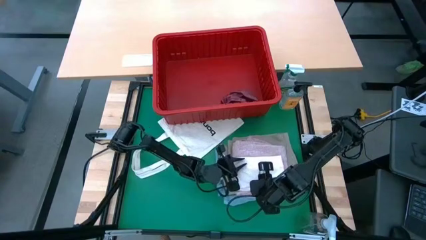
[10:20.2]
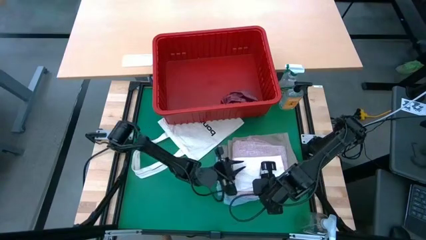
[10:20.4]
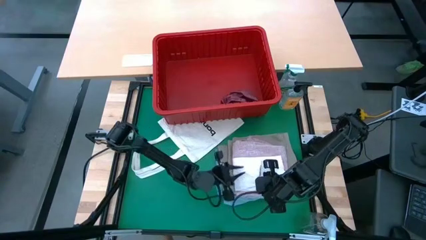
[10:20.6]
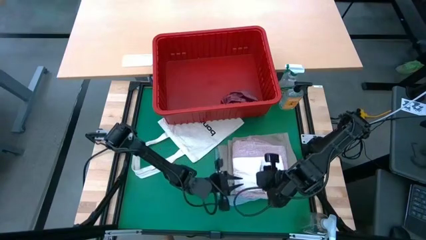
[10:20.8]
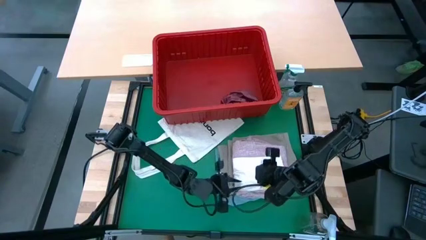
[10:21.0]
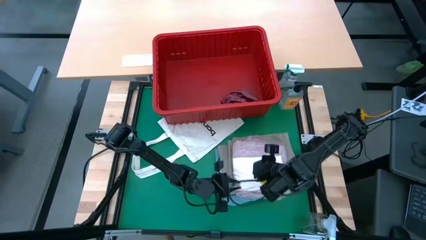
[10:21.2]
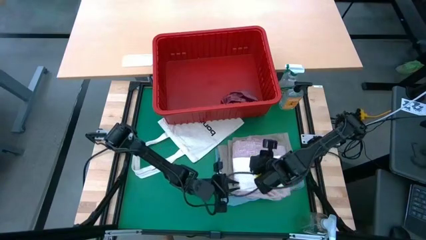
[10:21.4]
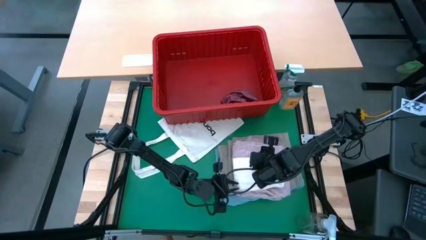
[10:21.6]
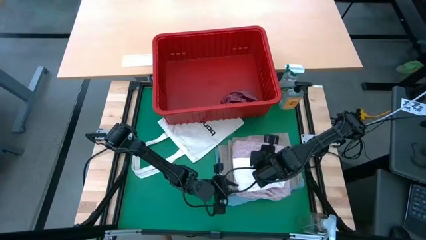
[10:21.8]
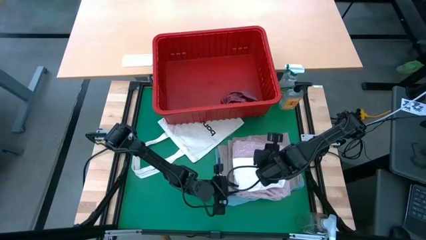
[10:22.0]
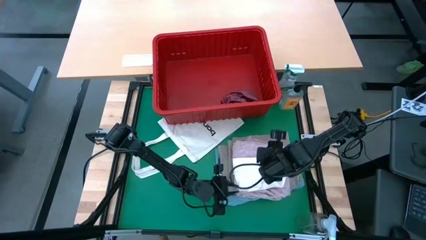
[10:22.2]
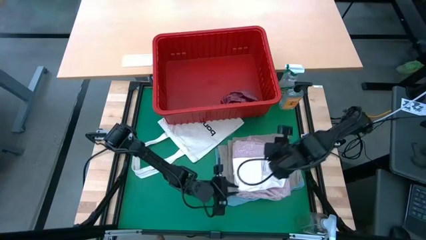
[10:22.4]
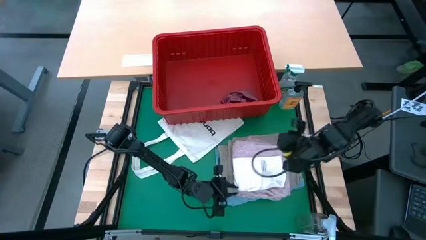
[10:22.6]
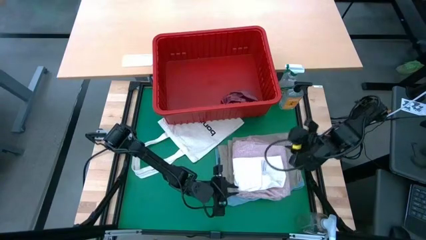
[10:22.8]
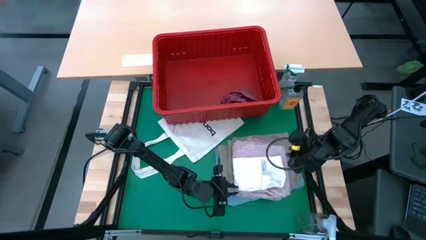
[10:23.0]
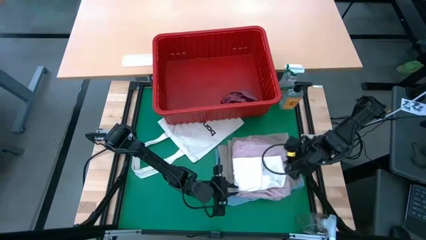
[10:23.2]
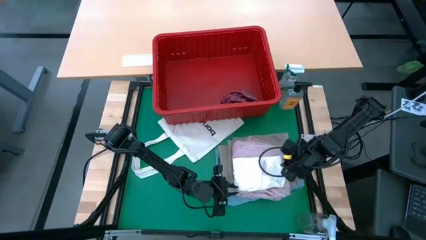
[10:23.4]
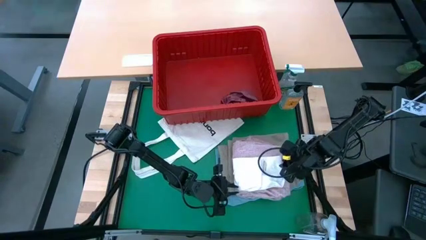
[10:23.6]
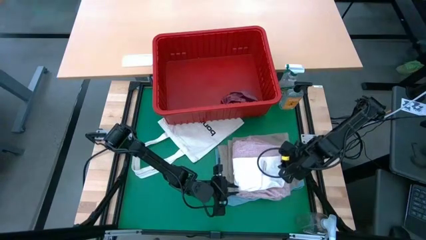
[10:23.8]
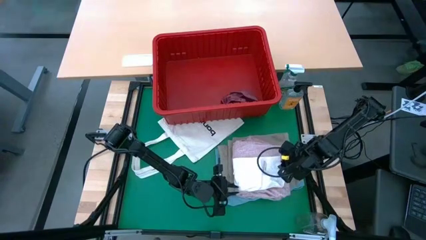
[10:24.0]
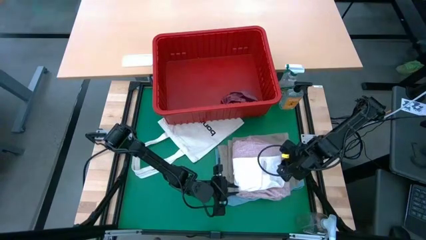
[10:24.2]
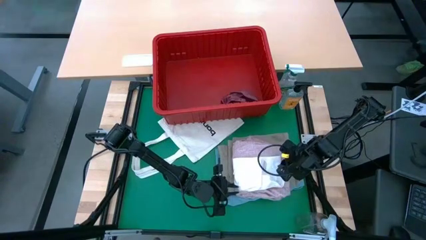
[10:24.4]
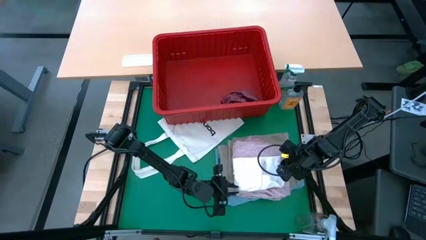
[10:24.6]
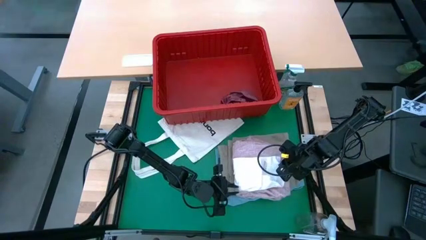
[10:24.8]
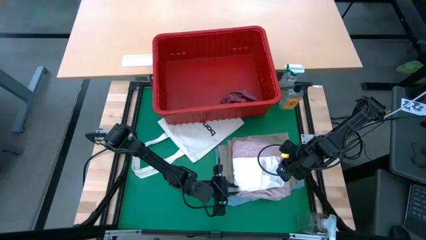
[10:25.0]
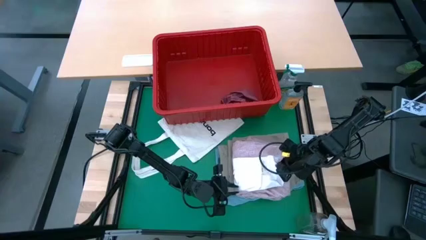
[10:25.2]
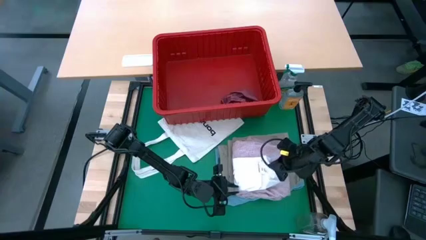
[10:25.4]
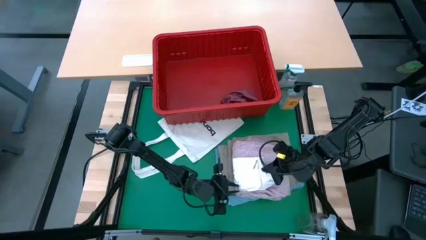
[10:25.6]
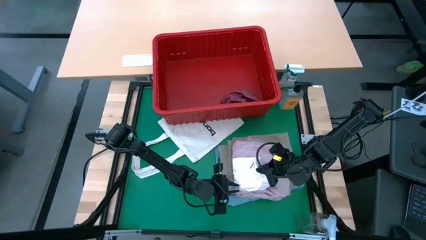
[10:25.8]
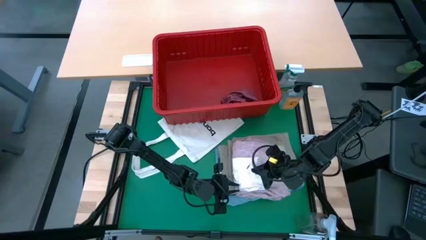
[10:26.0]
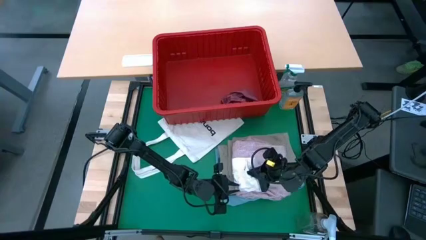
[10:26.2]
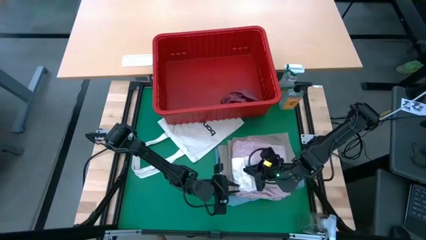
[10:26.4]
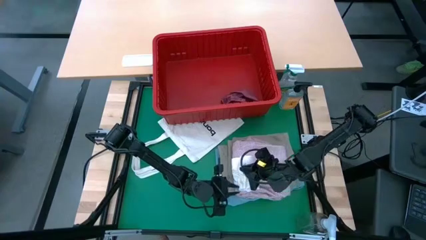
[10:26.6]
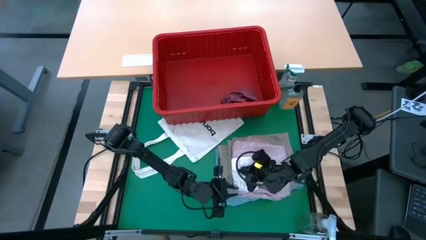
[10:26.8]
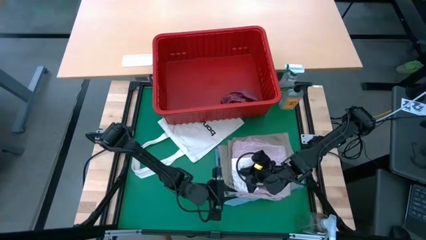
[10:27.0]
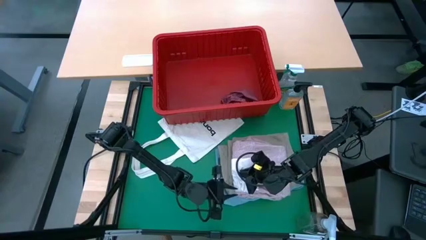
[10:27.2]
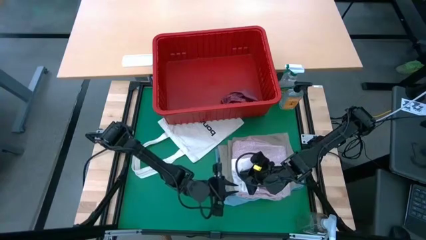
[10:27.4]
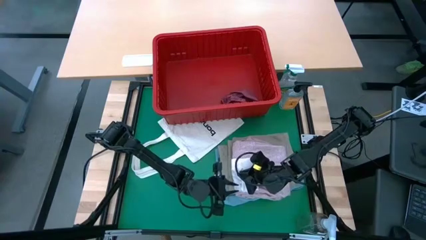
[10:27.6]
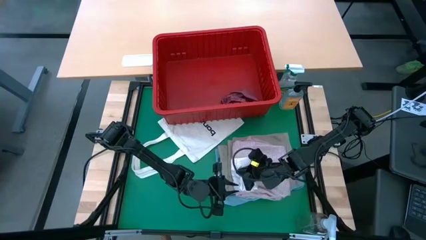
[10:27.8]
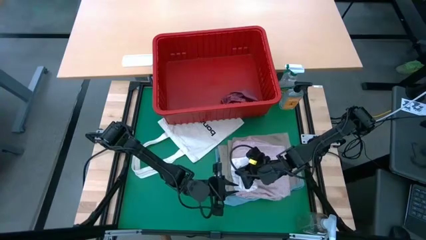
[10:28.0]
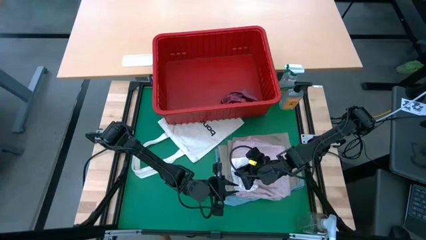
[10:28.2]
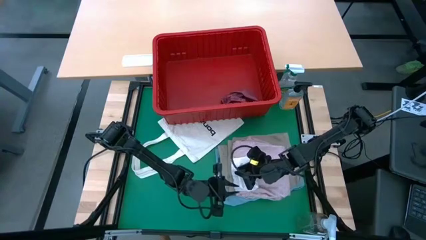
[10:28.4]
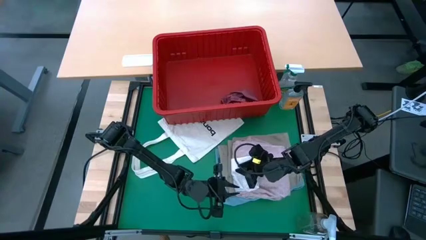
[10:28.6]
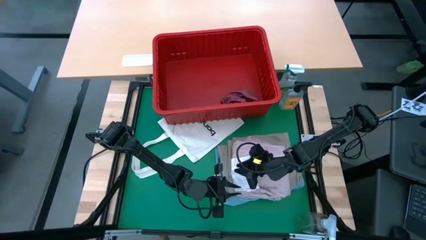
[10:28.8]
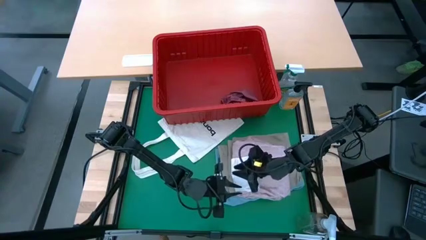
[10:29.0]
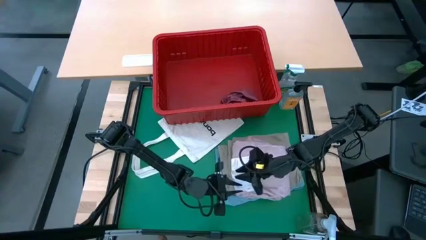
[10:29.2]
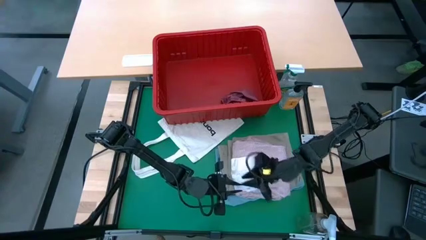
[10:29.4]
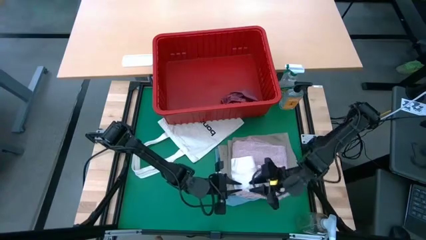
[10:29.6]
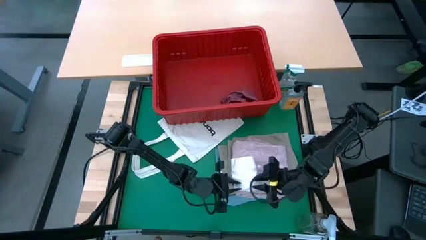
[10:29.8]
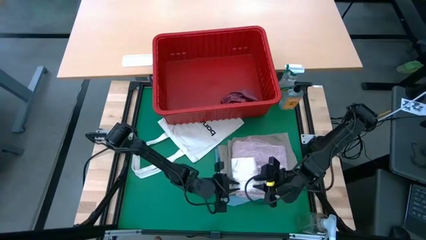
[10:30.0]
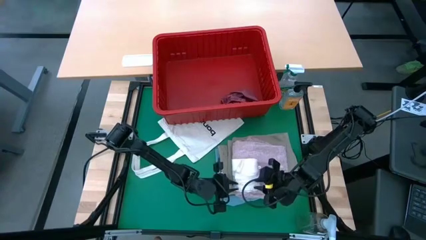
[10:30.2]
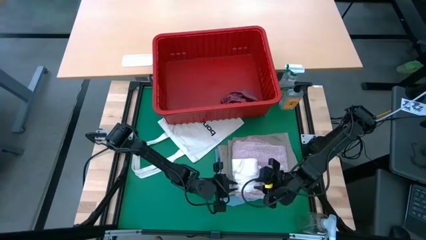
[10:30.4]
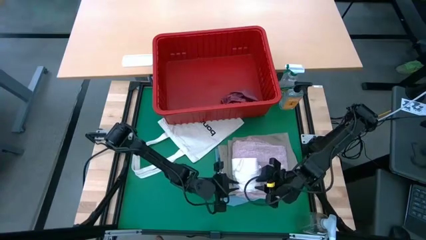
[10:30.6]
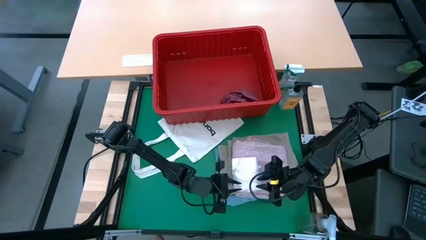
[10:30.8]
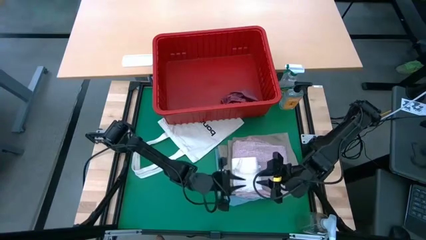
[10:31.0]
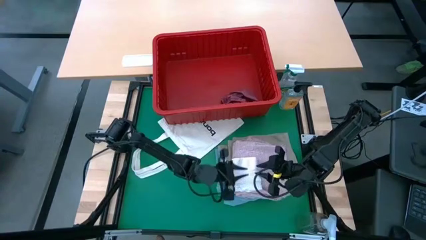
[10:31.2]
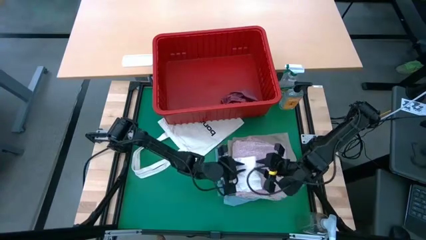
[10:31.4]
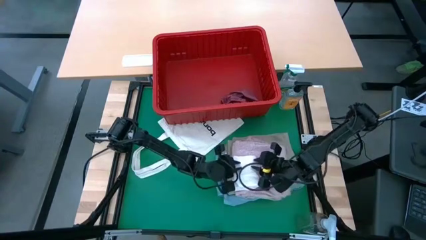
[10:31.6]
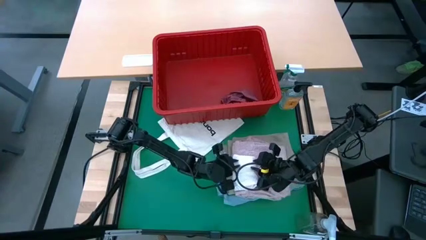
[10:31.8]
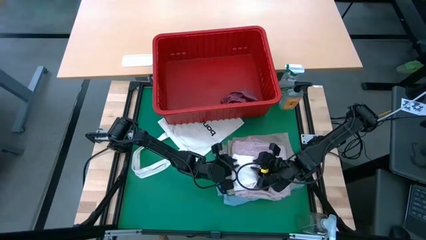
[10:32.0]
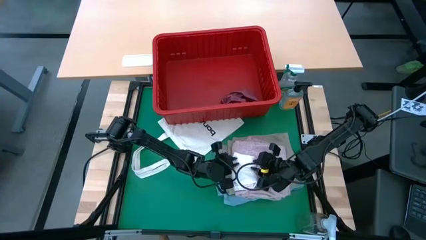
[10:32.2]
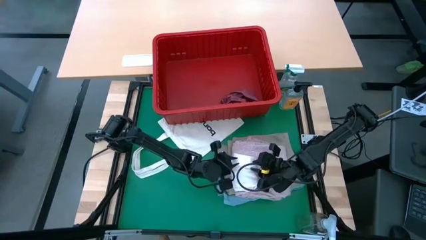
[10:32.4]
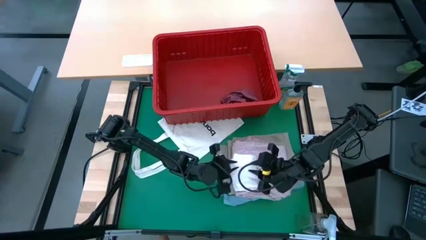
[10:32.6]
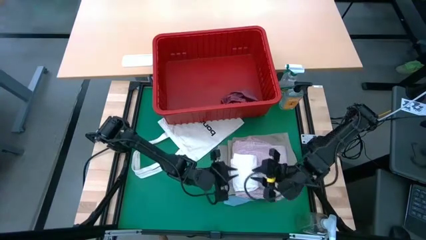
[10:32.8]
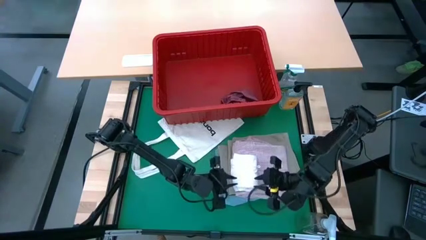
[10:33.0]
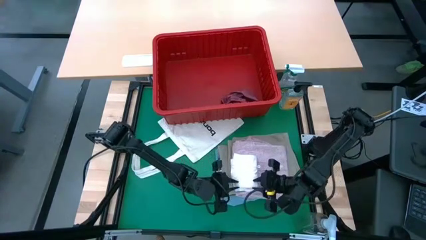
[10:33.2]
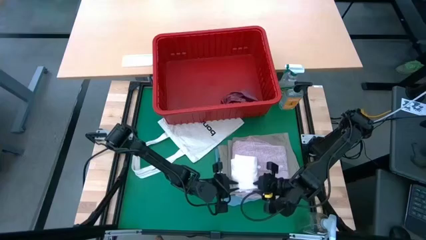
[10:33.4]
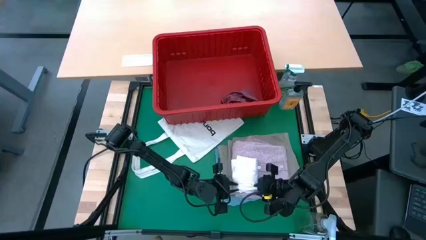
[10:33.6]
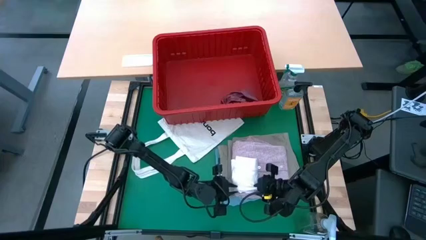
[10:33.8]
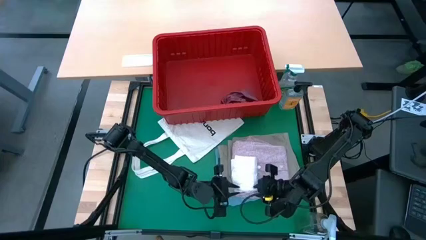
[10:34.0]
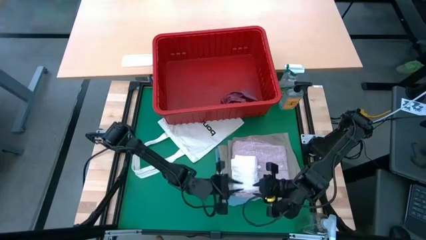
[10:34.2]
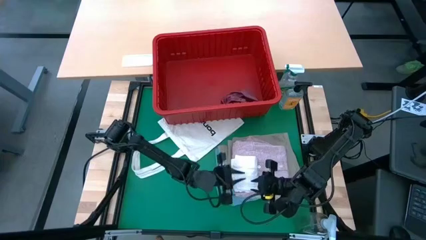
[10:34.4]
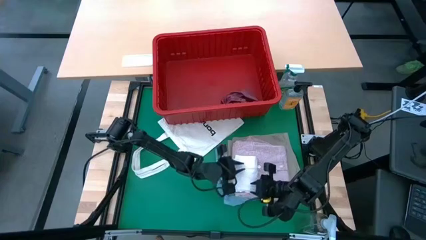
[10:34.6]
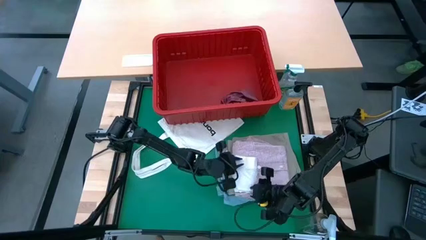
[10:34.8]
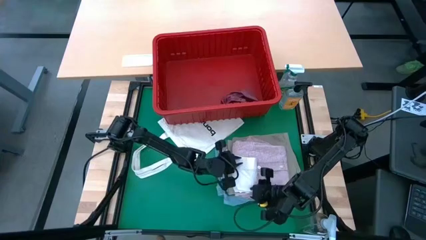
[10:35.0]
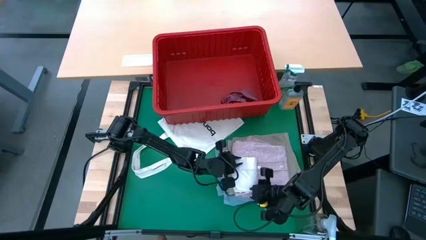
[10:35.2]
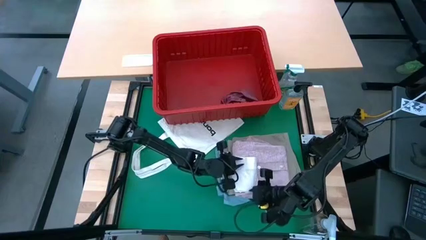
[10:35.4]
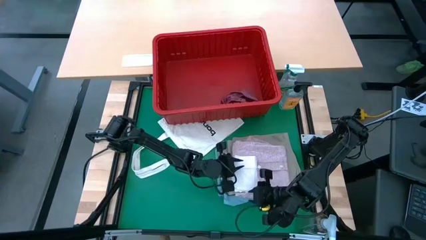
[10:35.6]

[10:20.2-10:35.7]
Task: Fold laundry
Fold the white underwear
